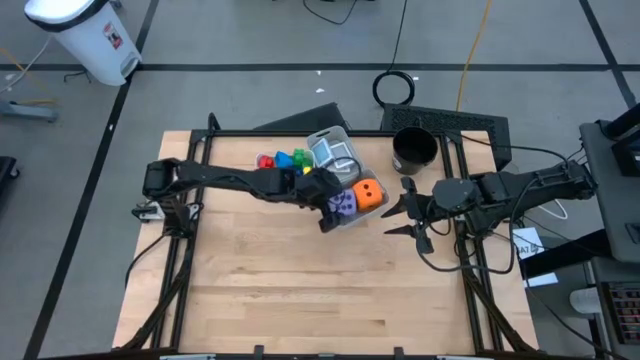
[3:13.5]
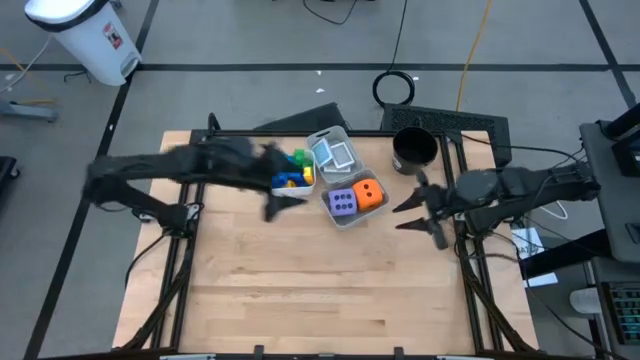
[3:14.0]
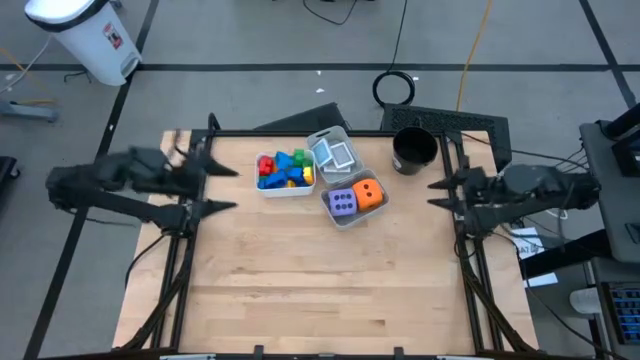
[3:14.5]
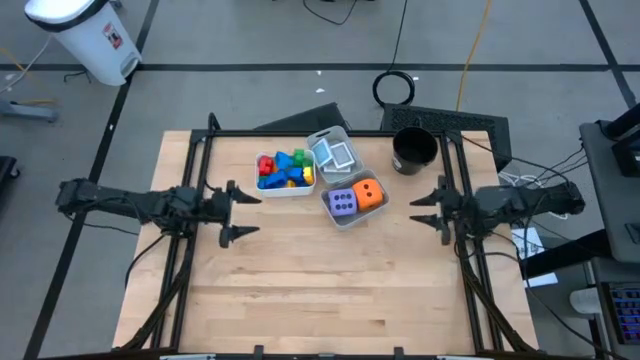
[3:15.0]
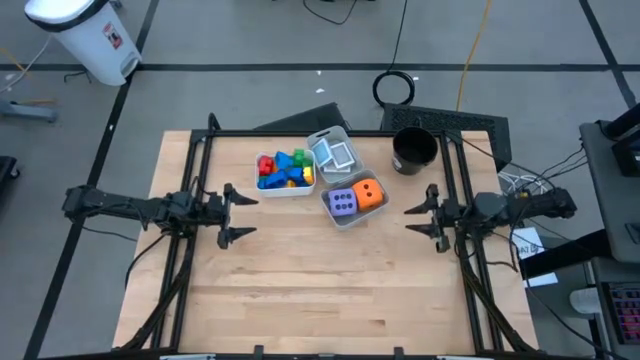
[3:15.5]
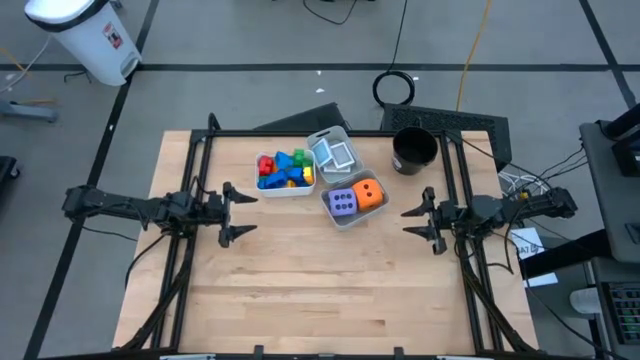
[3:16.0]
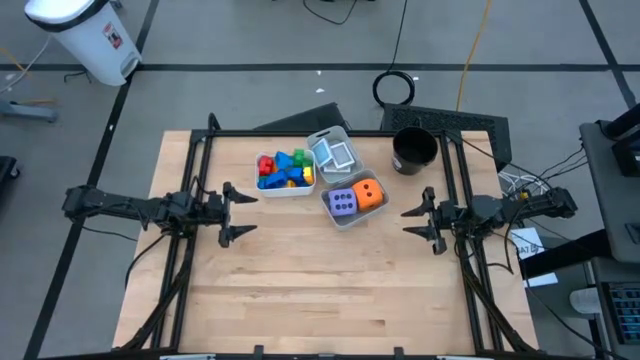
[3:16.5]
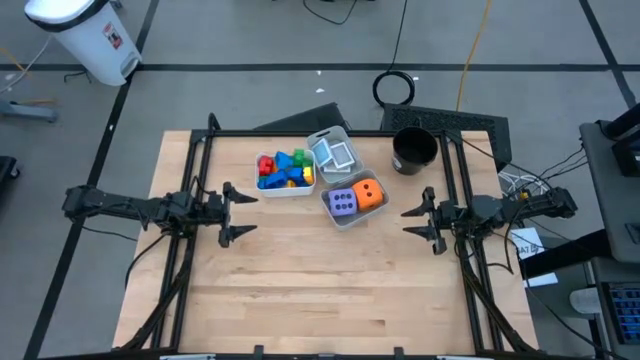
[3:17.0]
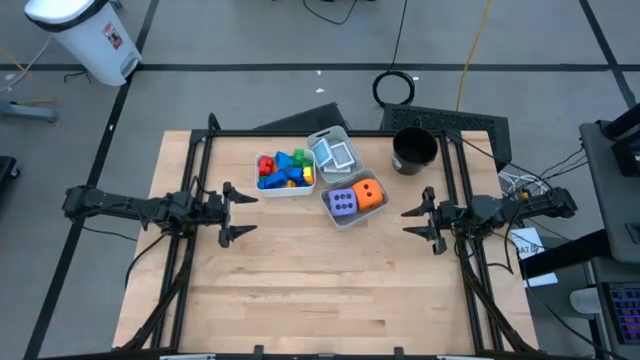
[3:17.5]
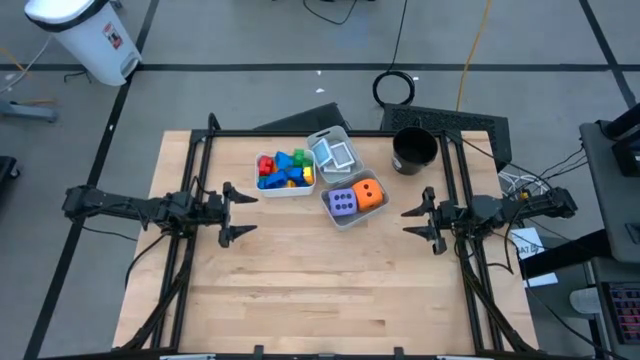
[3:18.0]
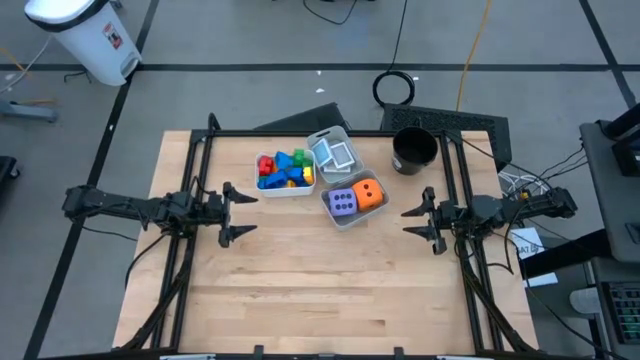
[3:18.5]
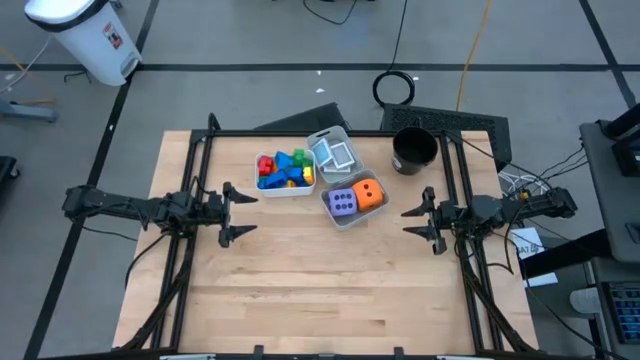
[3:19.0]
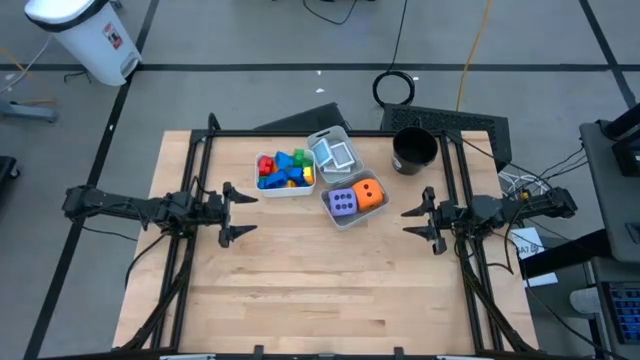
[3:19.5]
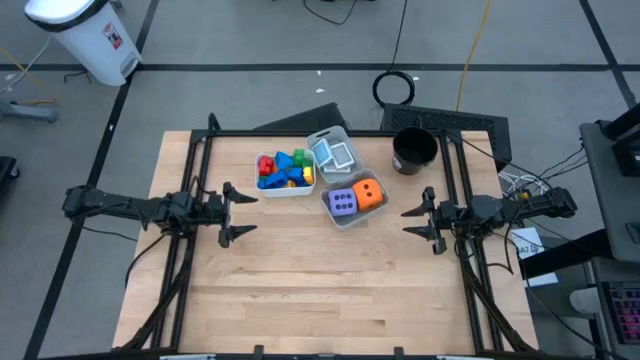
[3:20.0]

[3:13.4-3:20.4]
Task: Pick & Place Toys
Return to Home Position

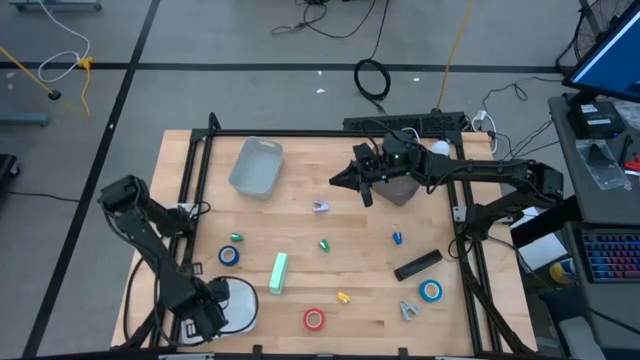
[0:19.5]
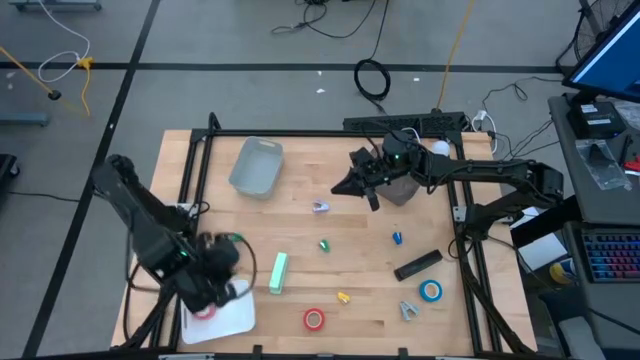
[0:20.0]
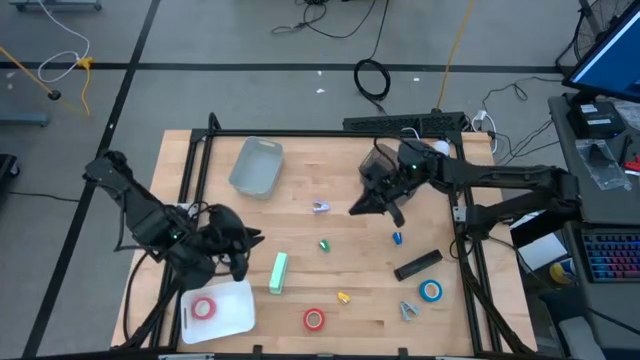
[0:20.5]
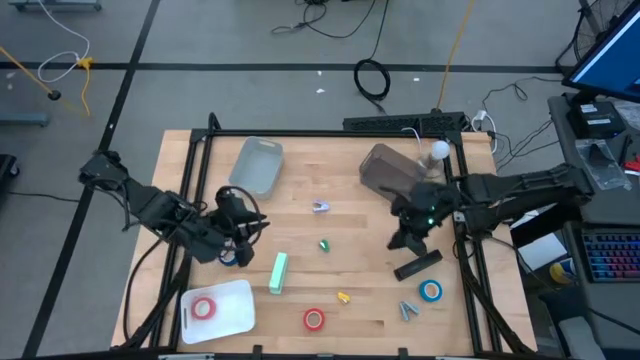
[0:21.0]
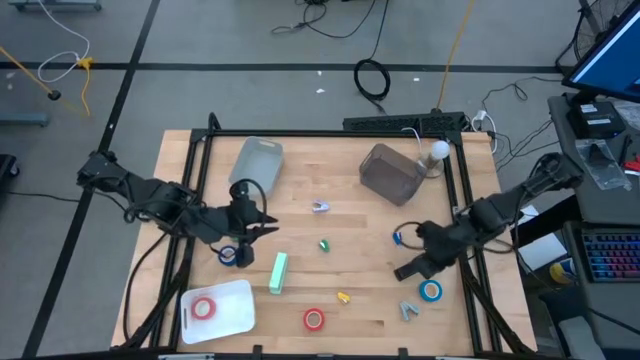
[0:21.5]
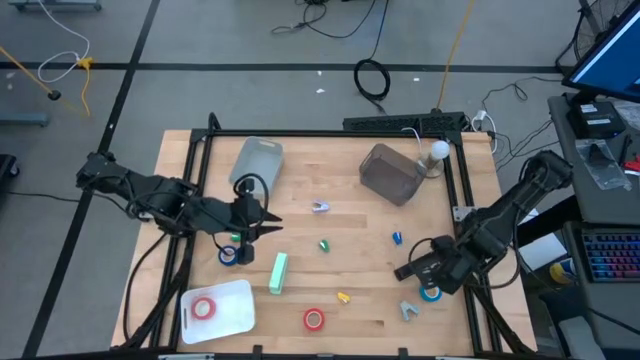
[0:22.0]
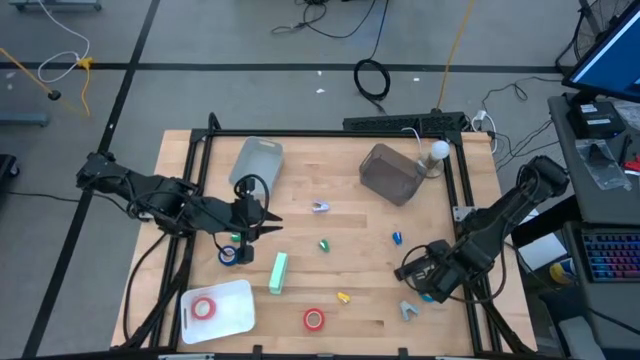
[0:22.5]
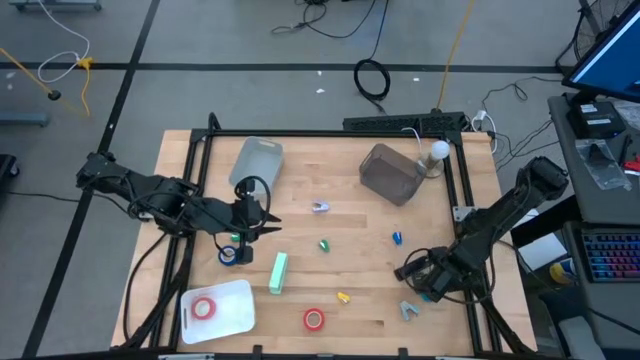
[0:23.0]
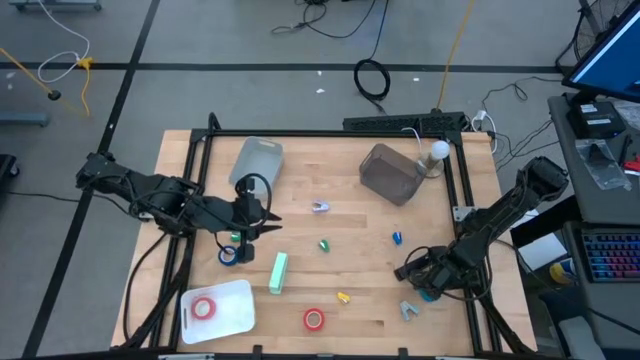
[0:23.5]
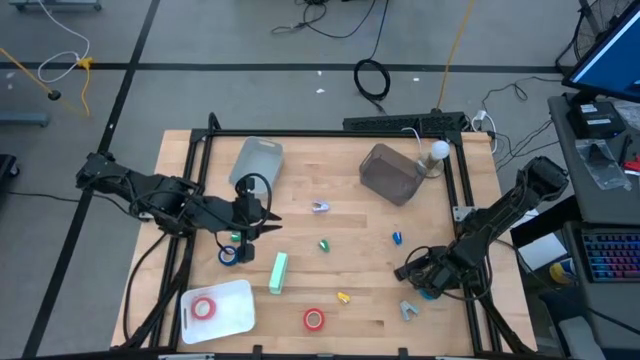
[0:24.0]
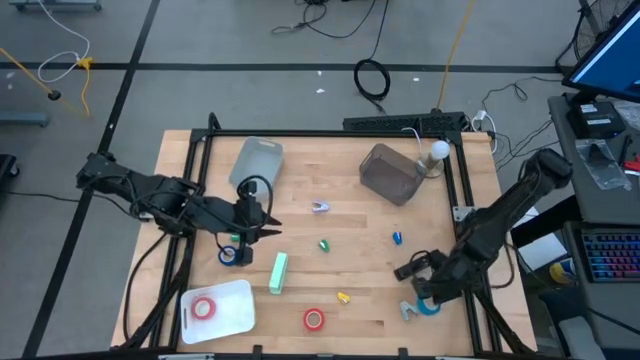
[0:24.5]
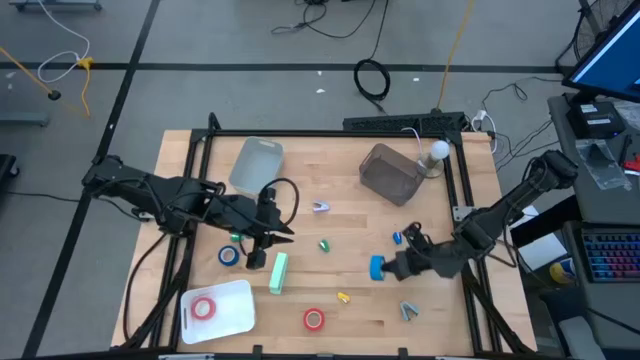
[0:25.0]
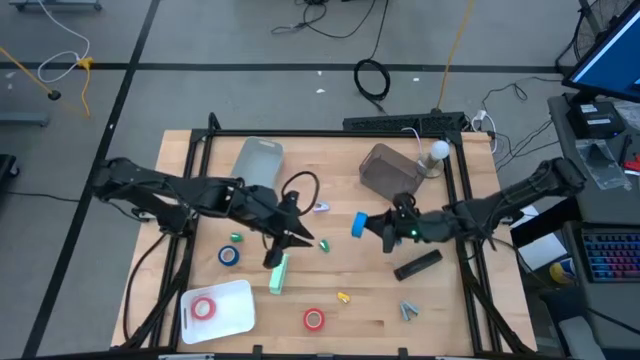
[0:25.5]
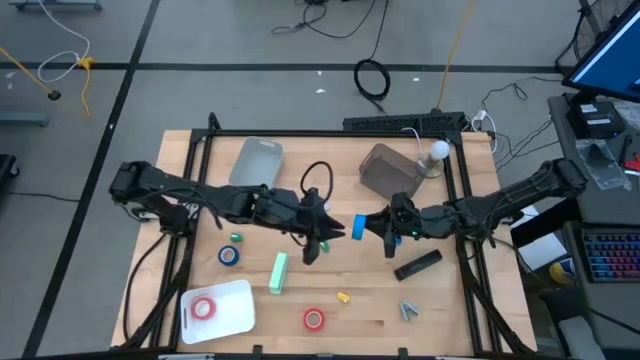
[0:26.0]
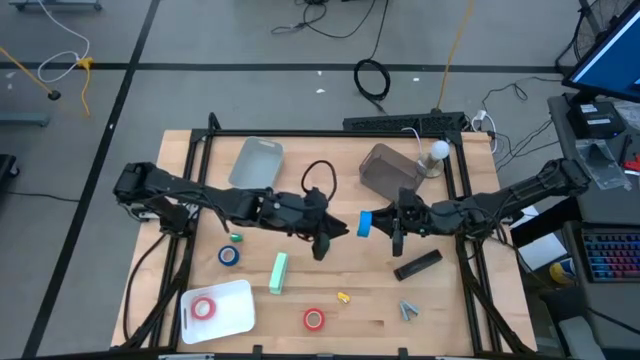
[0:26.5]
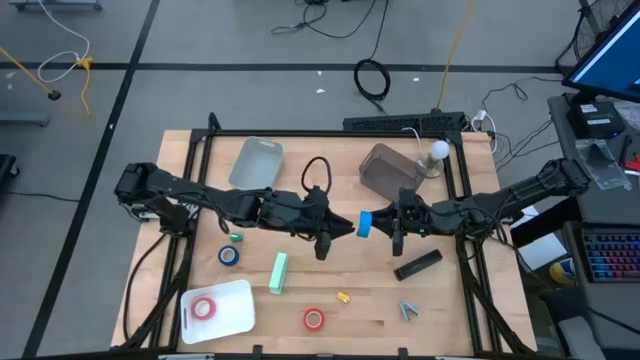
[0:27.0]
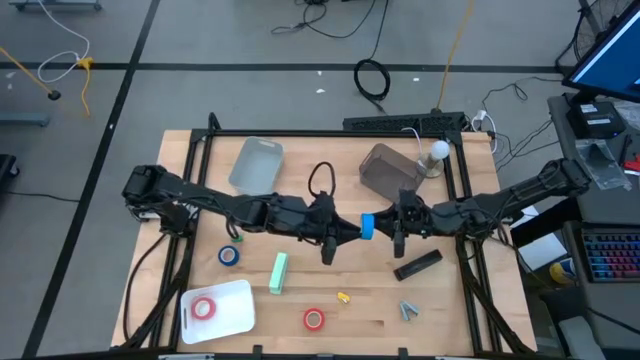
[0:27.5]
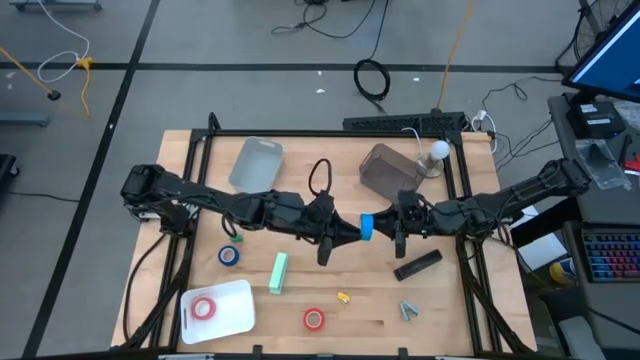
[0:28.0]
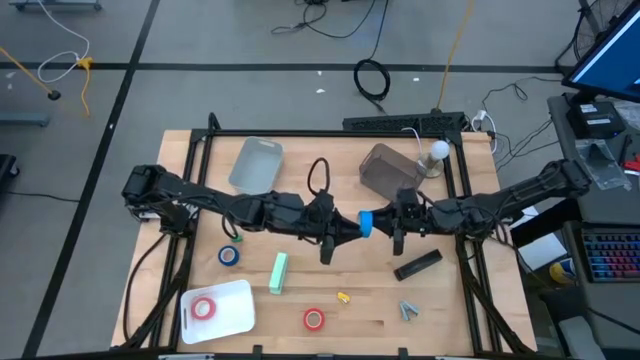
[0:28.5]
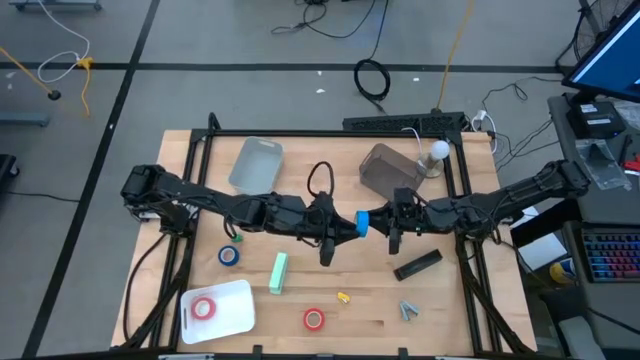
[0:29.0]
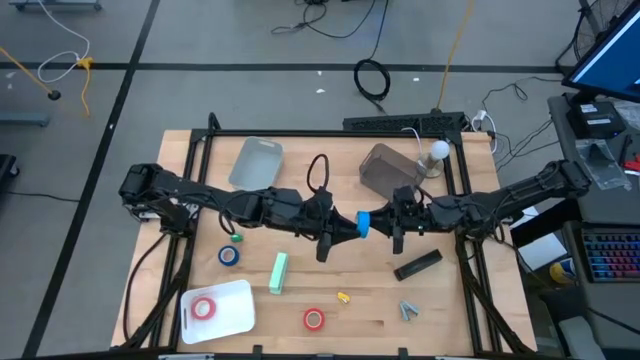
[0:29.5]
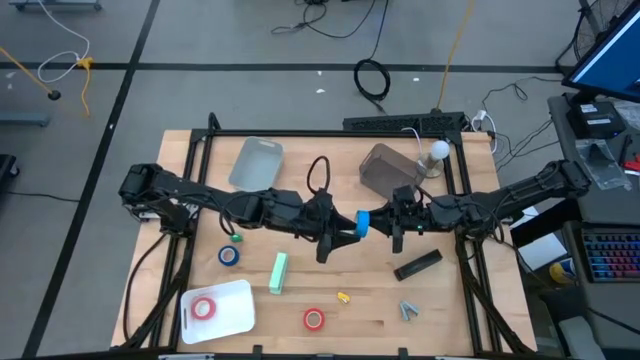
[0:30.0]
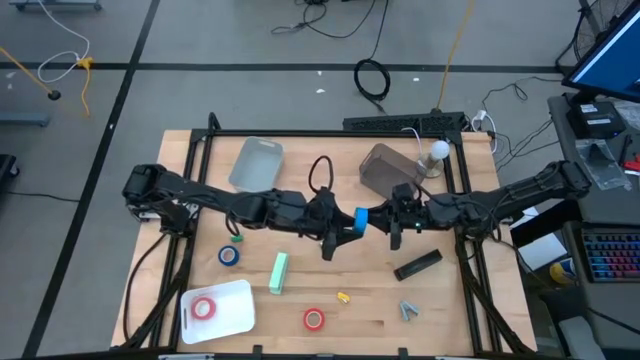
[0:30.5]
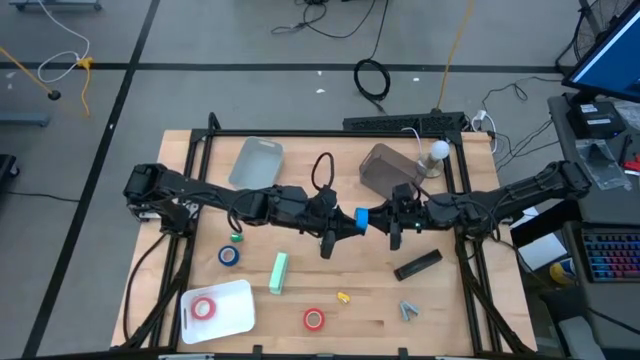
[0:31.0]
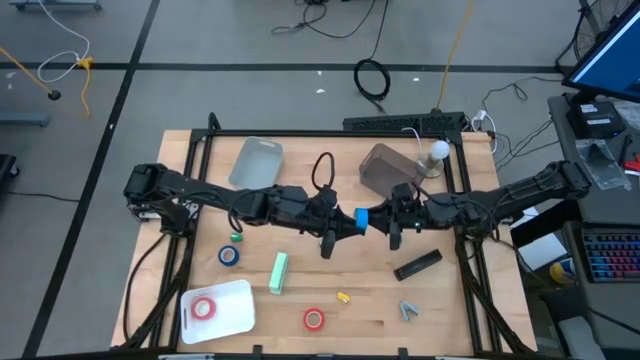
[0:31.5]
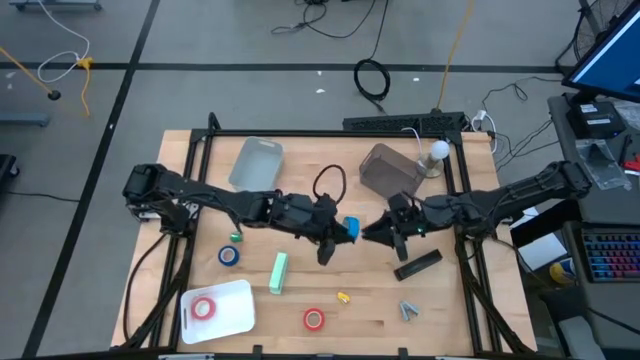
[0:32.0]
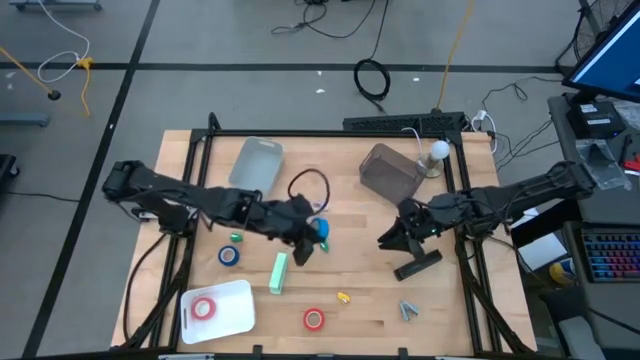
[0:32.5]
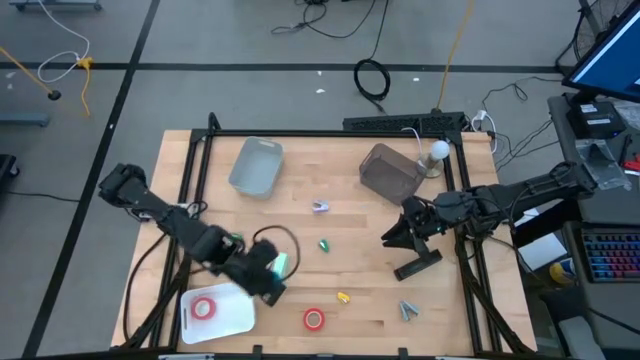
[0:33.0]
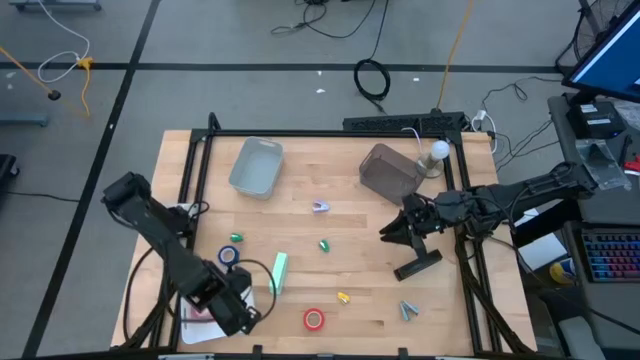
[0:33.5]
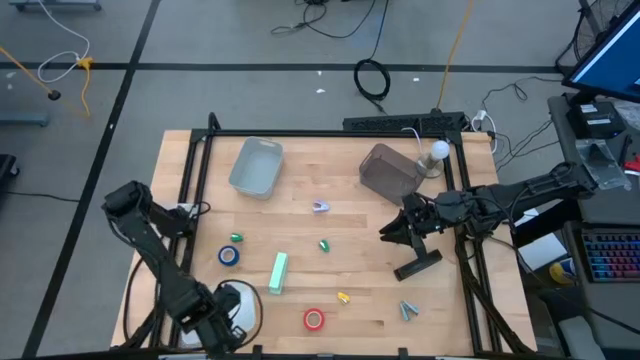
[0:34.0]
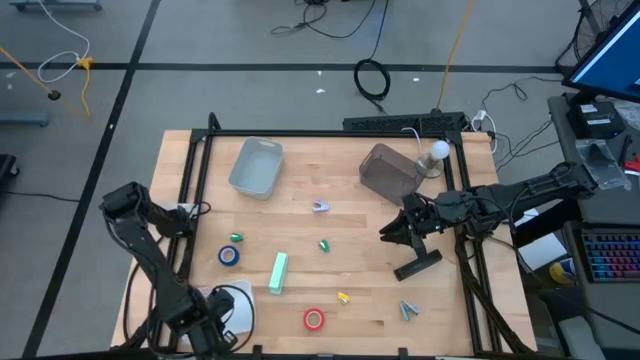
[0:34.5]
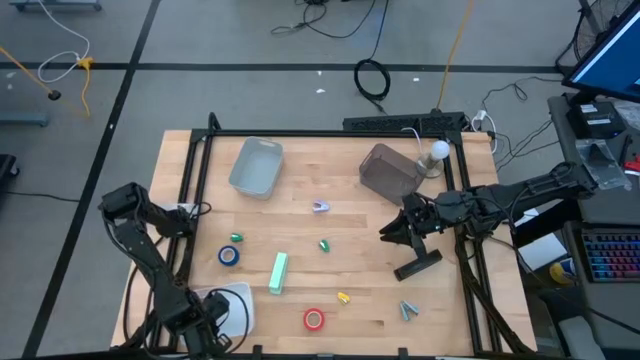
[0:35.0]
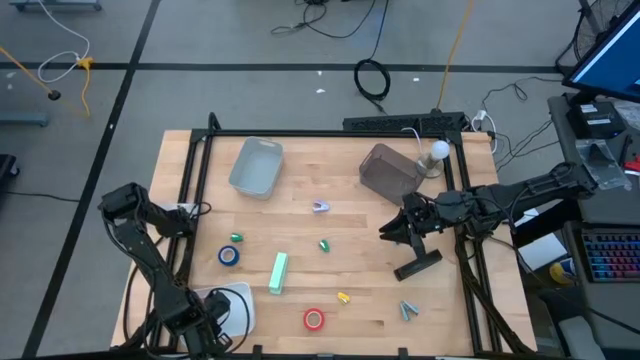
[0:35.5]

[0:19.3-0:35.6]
Task: Pick and place Stapler, Stapler remover, tape
Put the light blue tape into the white bin
